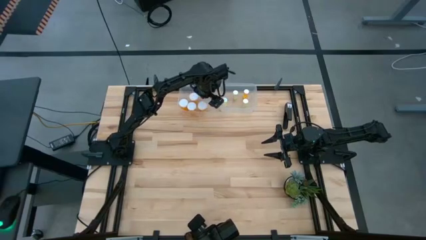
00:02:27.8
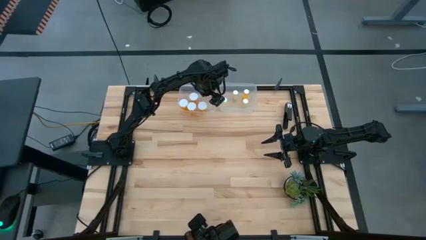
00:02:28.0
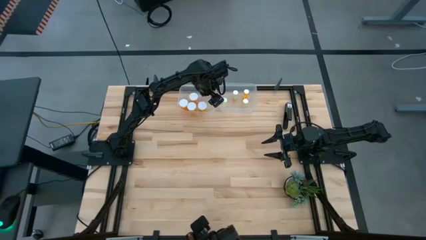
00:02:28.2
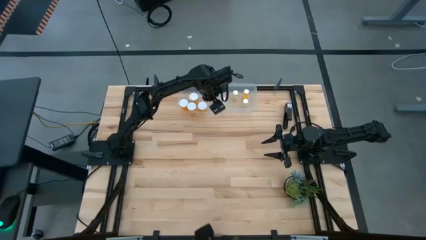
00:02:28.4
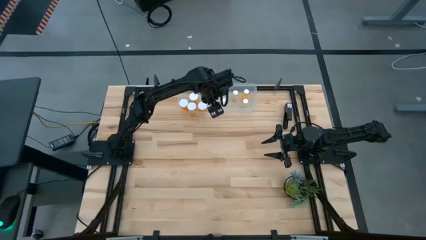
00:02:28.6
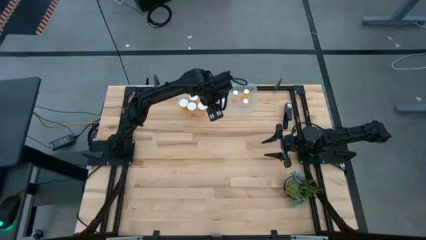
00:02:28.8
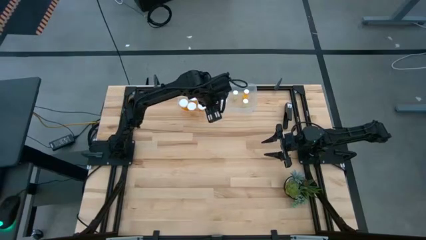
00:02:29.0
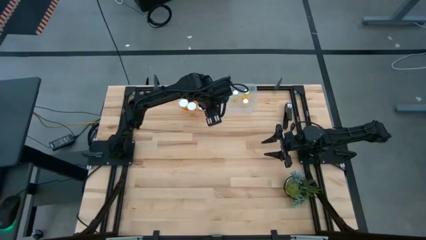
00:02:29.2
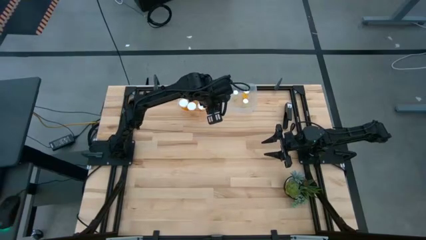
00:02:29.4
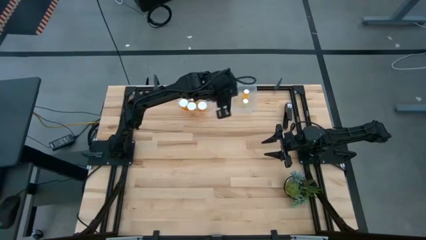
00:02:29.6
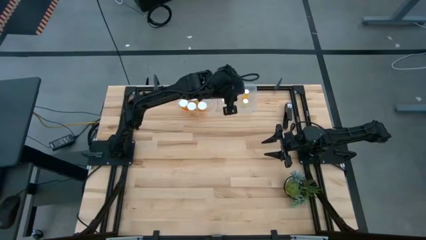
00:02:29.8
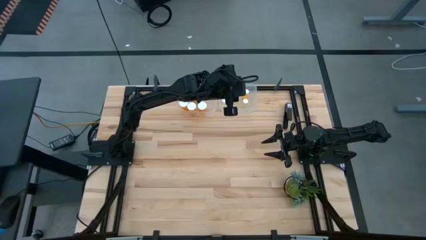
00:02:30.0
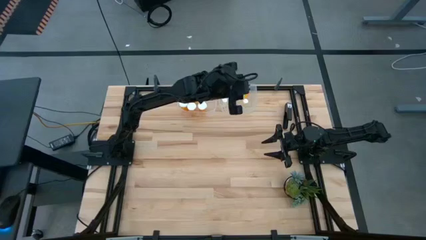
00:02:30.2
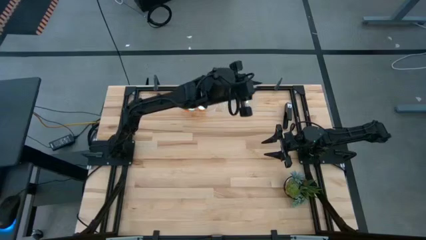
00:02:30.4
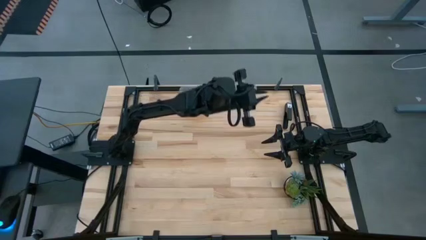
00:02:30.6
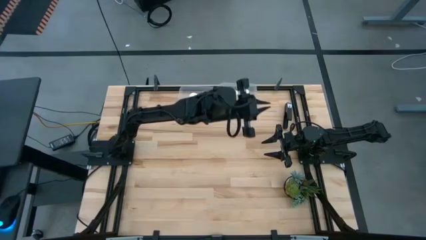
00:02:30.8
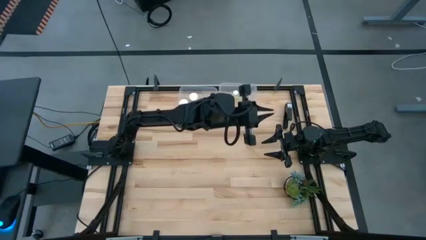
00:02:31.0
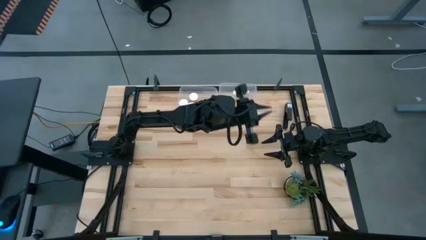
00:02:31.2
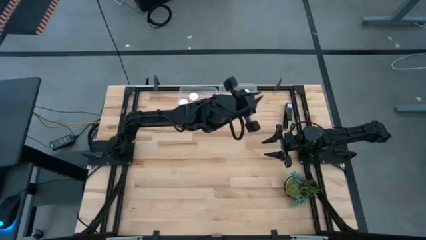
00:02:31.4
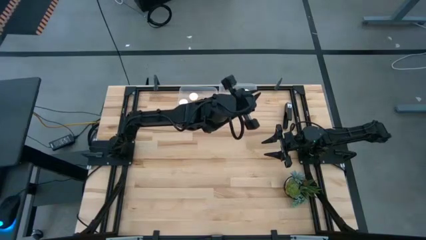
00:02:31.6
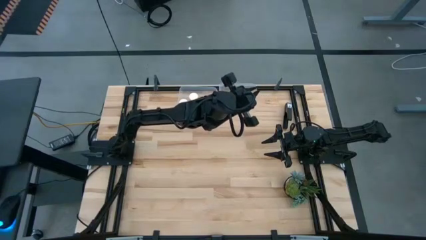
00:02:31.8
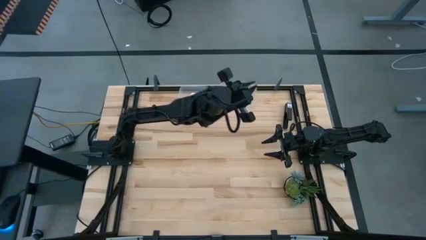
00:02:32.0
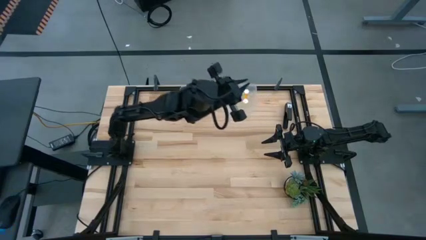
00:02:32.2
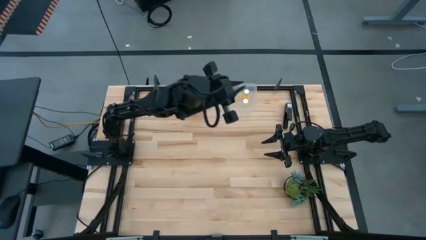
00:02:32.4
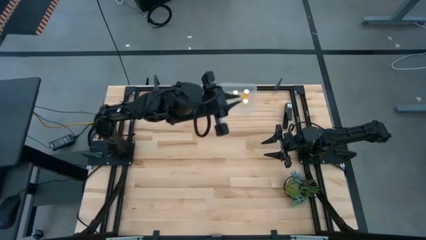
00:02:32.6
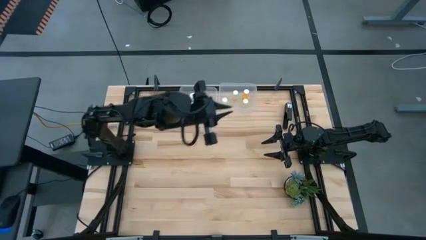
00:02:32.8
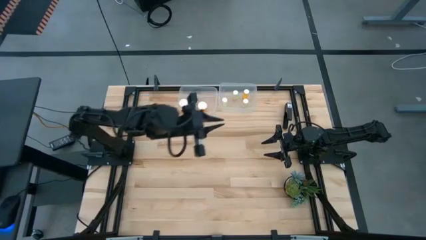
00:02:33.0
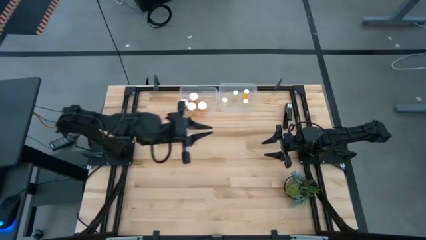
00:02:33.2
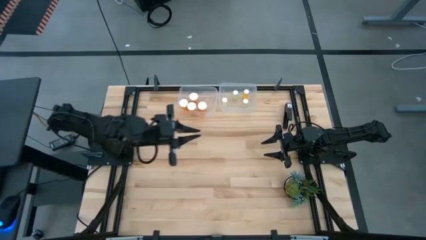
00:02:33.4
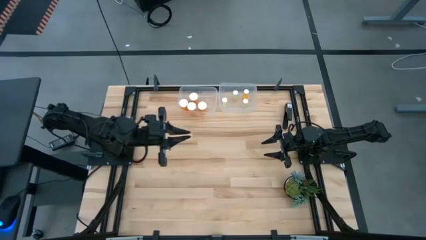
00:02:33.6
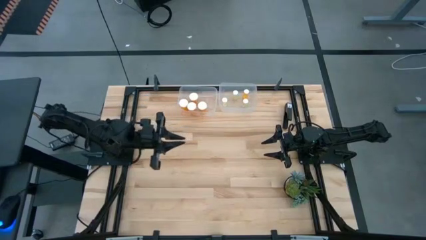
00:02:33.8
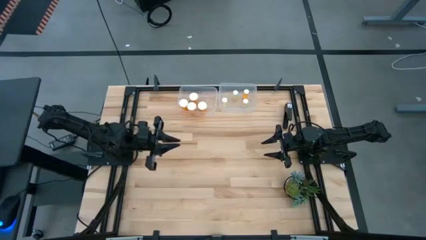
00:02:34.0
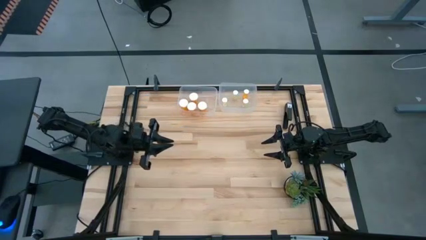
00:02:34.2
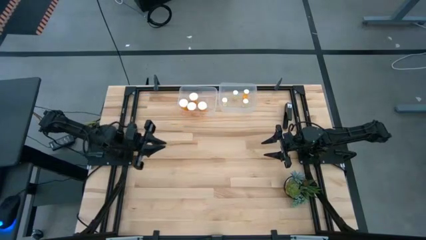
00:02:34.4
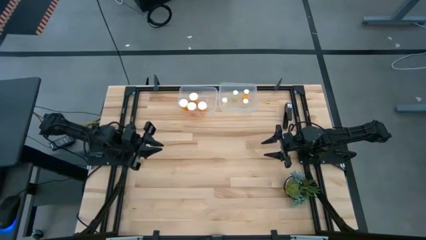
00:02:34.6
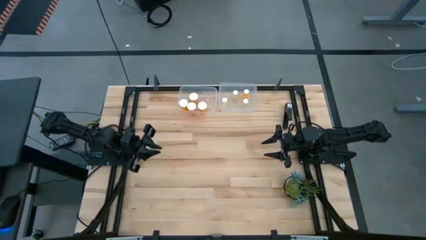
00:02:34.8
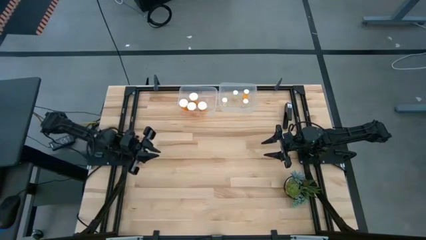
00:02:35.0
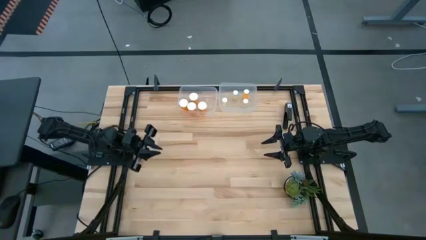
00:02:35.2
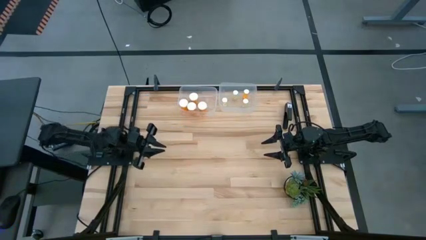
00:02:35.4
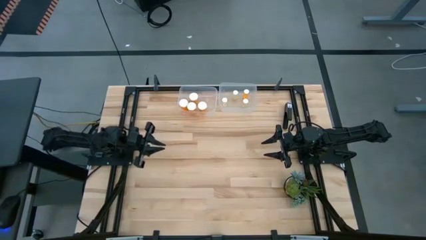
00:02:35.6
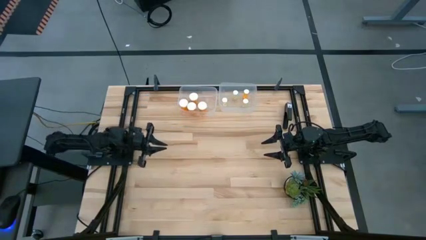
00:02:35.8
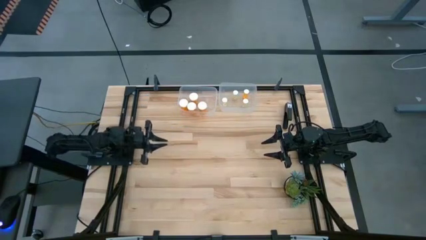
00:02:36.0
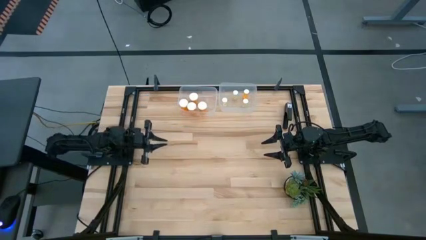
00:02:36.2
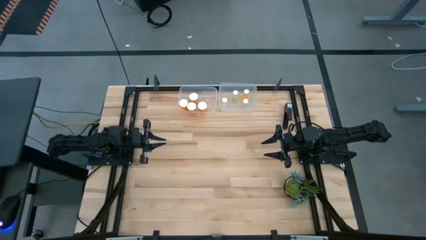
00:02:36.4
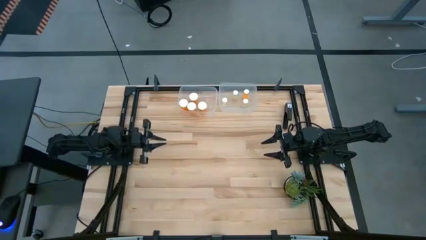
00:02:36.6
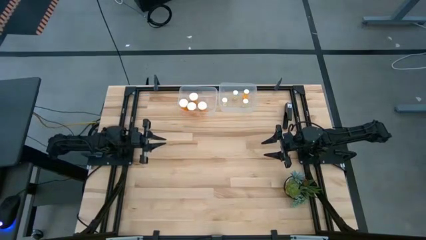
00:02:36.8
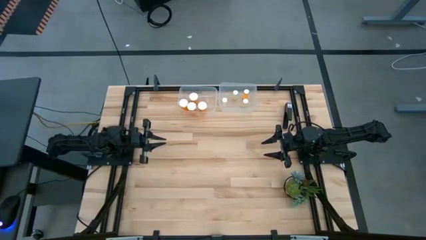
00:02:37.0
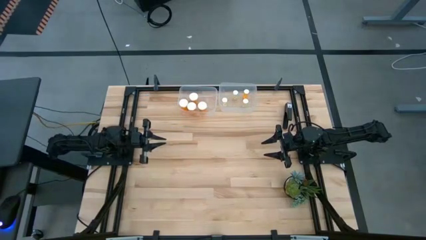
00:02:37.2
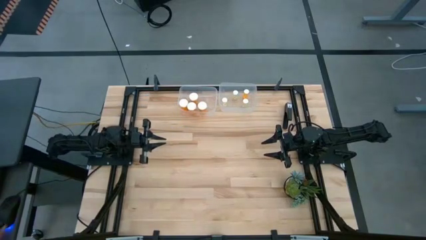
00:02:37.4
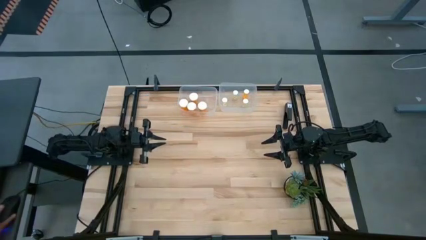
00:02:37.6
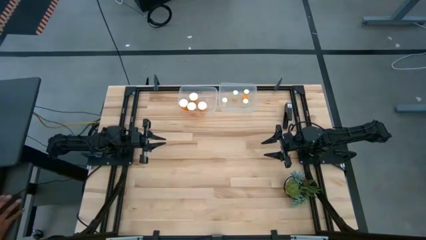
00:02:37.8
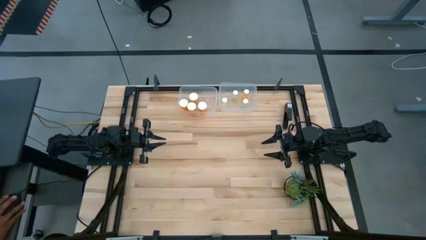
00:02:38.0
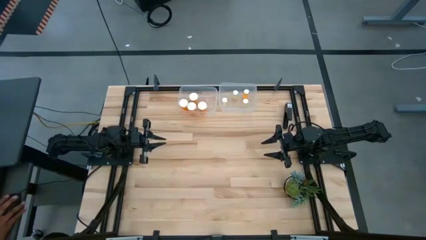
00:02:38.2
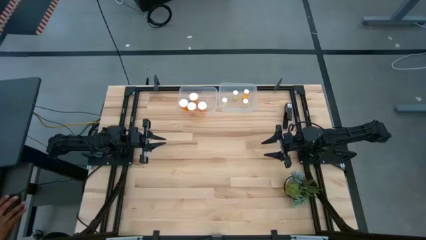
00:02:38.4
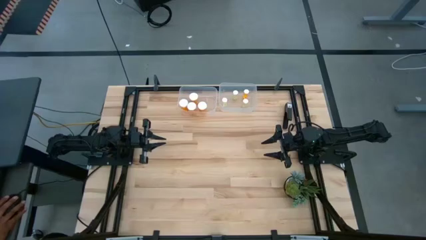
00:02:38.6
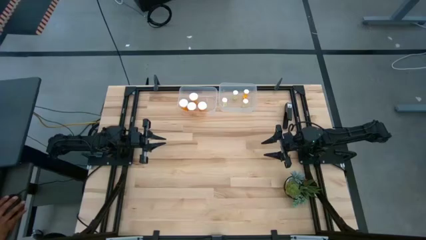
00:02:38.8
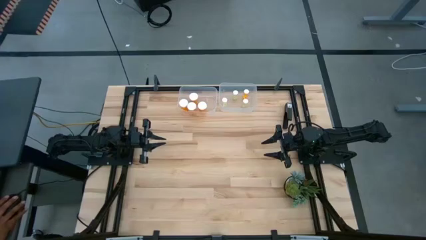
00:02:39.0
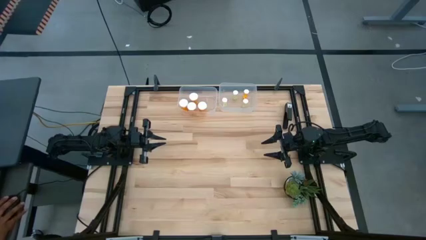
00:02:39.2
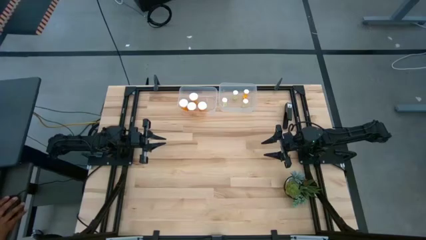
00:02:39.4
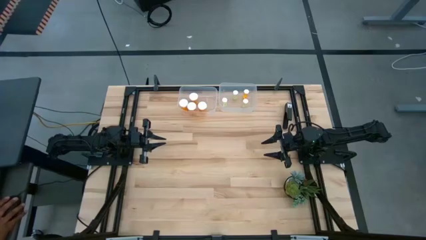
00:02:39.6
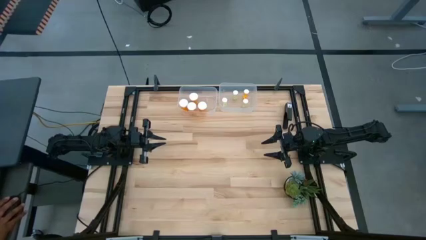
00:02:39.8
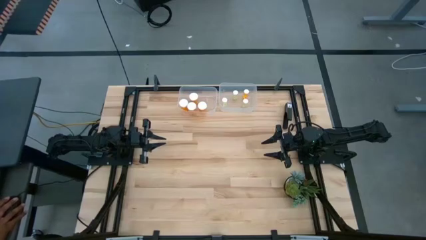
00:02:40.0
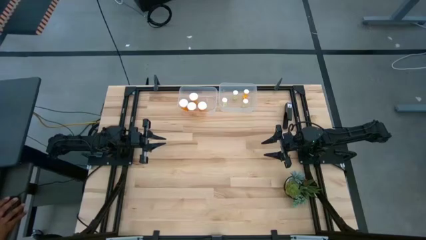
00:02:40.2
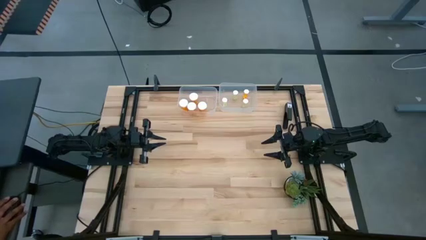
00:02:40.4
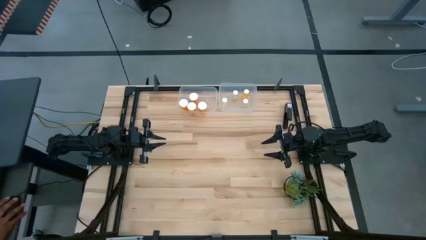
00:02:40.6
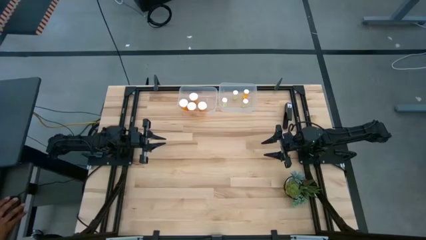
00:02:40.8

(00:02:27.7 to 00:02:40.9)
Task: Pick and place medicine bottles into bin by pill shape (circle, oval)
Return to Home Position

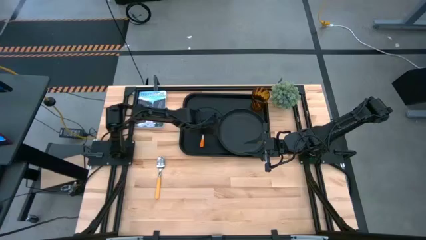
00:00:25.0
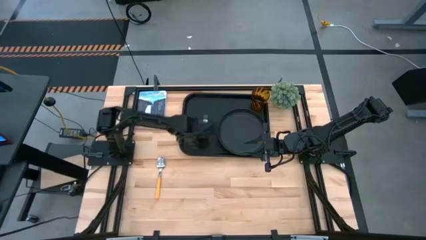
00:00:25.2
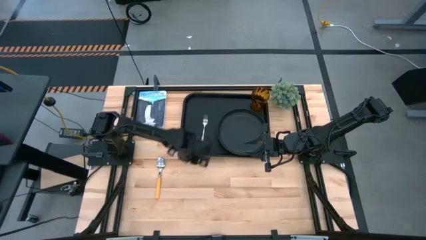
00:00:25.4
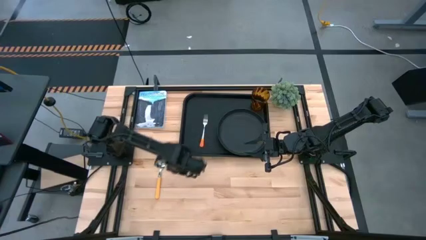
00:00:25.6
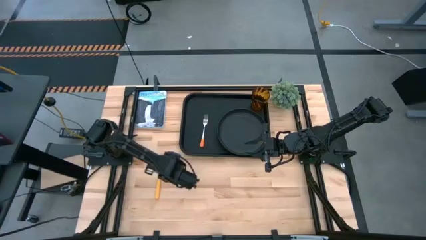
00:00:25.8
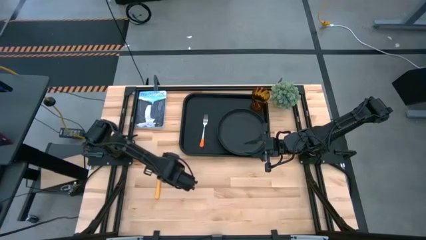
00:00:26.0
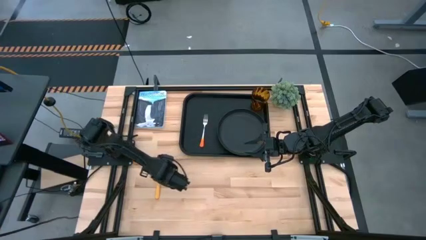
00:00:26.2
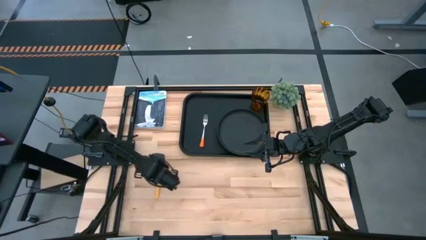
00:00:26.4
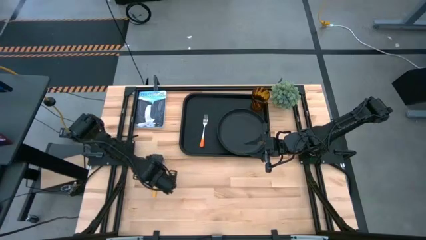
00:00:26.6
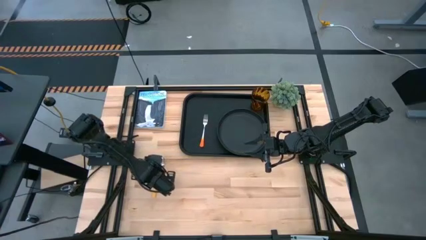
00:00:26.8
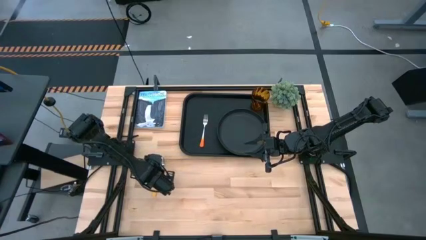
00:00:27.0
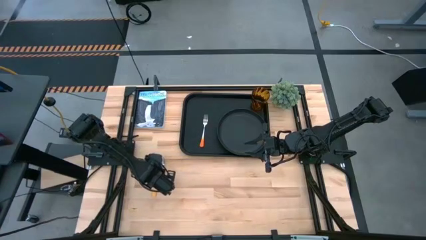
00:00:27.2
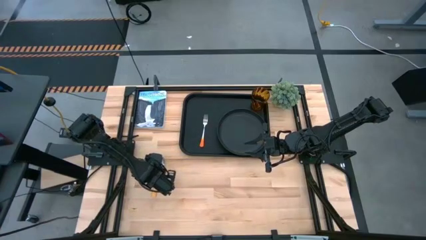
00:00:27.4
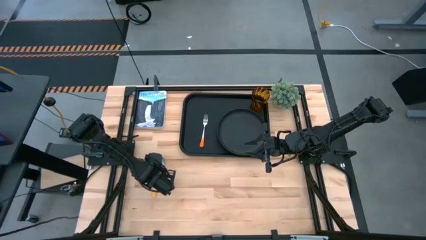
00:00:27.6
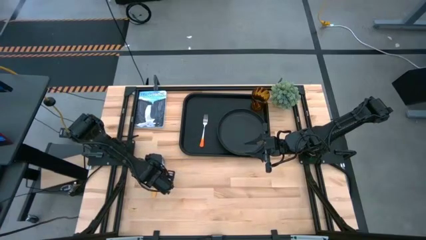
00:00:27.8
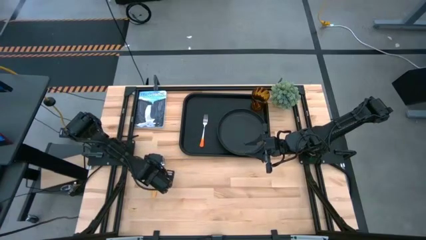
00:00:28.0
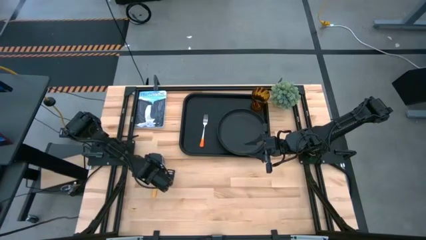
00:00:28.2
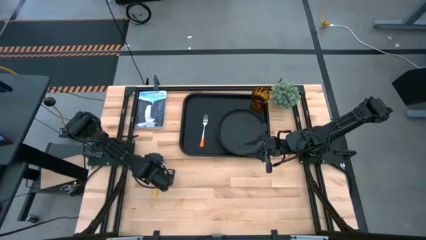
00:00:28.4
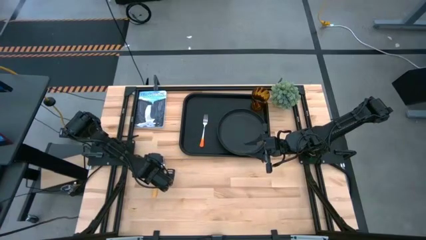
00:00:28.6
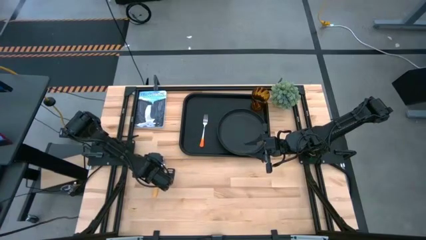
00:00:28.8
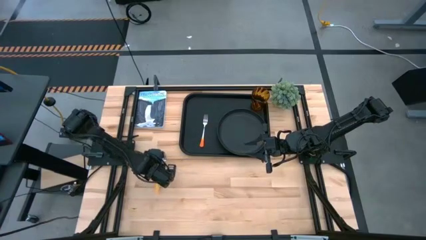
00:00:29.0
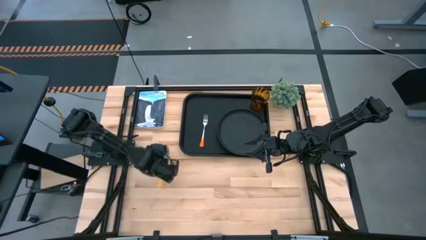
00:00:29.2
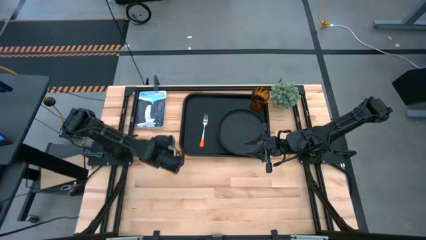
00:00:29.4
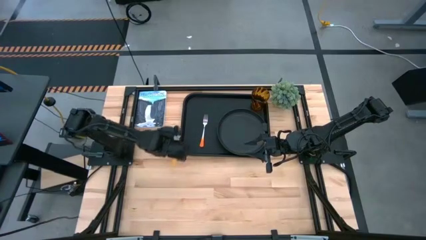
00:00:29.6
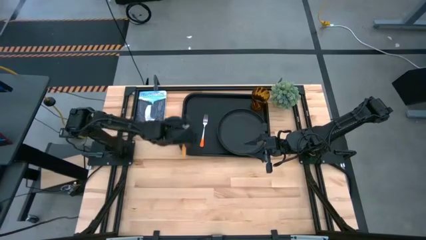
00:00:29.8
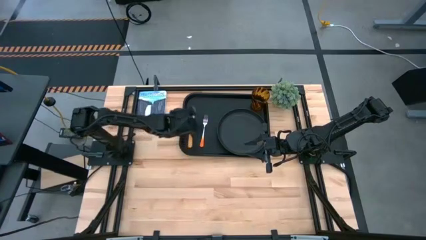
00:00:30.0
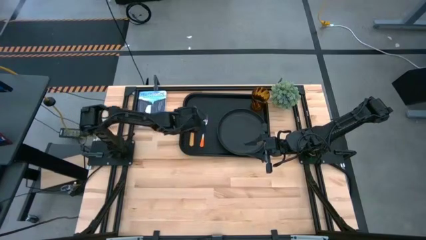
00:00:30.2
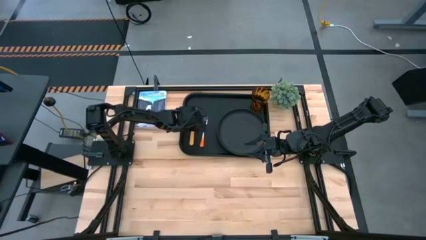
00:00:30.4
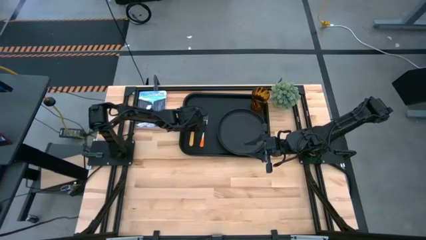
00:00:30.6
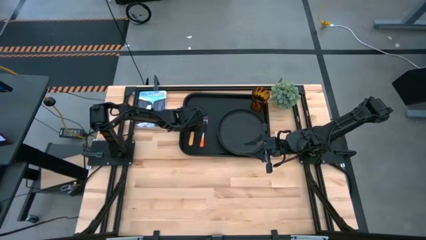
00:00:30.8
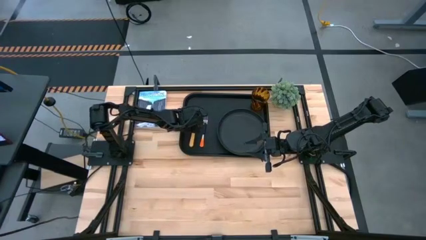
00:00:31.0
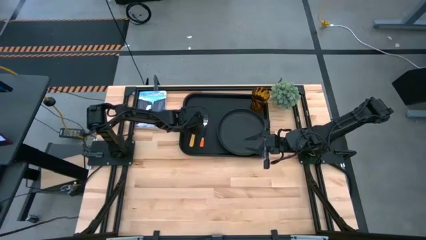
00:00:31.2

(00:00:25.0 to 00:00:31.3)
Task: Pick and place plate/cup/fork/spoon on tray
Put the orange spoon on the black tray at the left side of the orange fork
